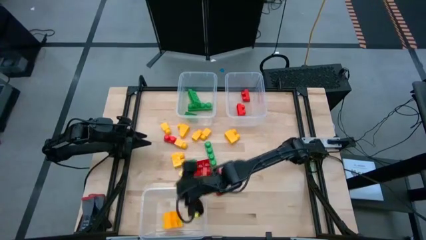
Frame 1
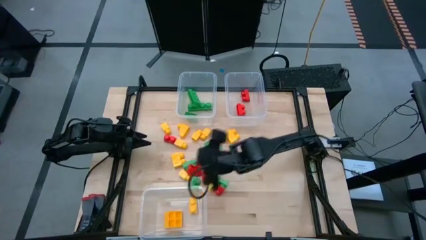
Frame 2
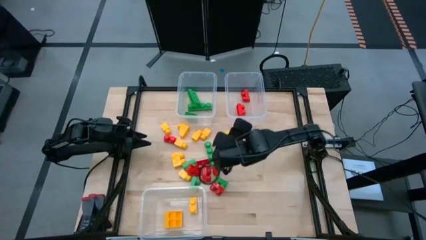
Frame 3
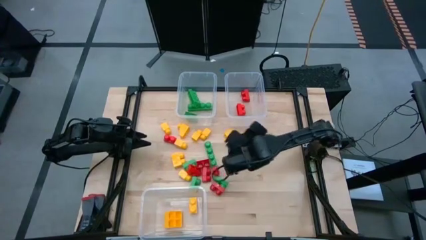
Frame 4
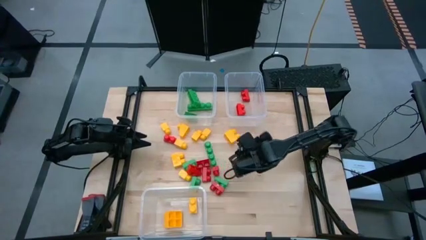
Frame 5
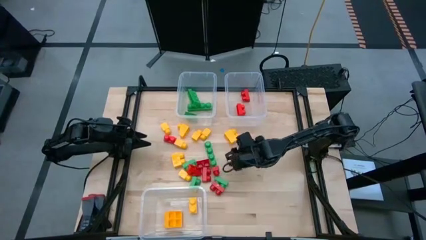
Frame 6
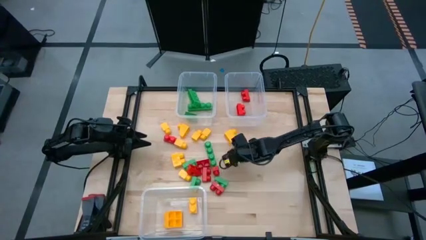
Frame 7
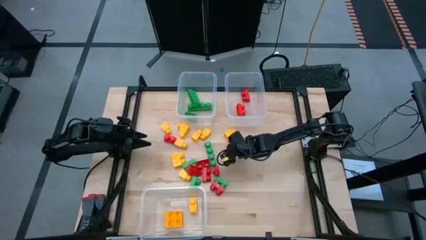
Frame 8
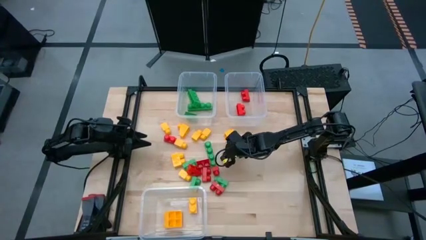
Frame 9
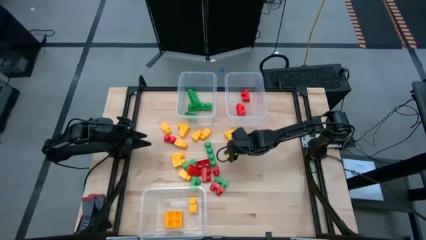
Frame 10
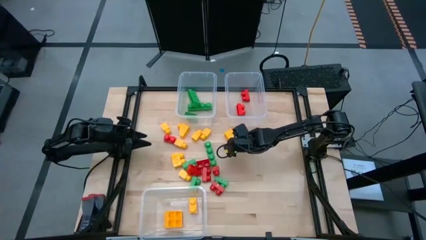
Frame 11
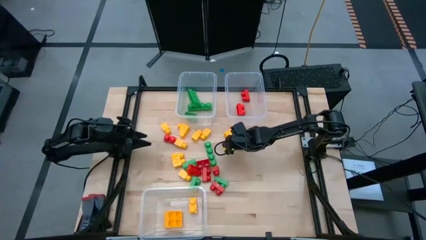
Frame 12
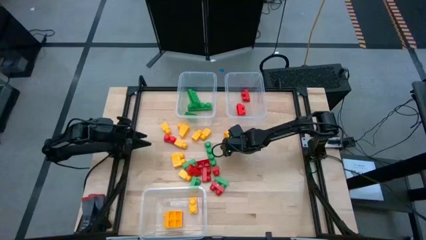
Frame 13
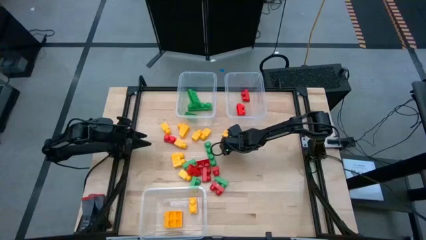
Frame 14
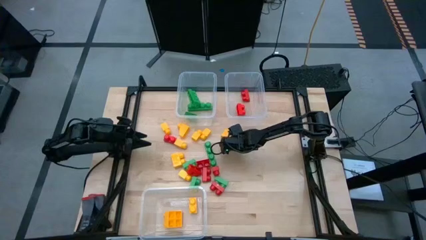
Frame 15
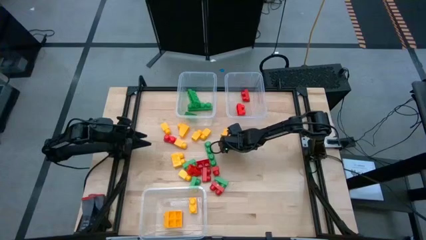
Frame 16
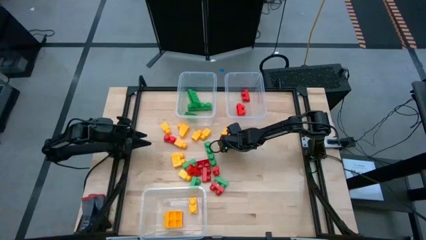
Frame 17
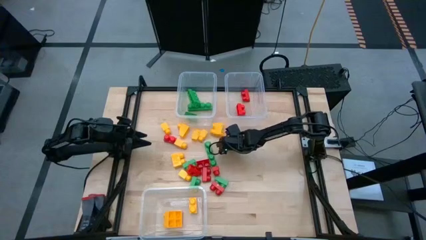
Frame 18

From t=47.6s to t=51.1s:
Task: Sort blocks
Put the yellow game piece into the bottom transparent bin

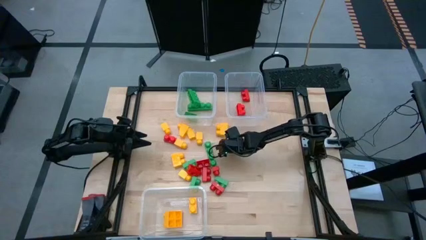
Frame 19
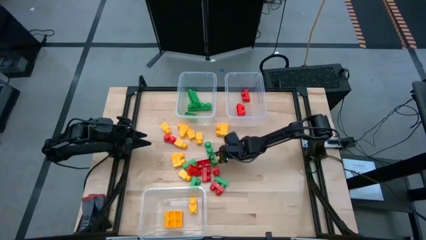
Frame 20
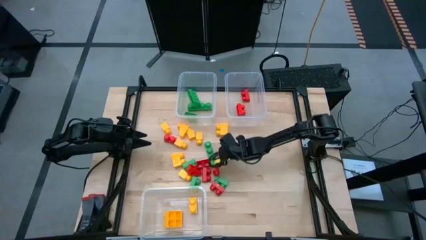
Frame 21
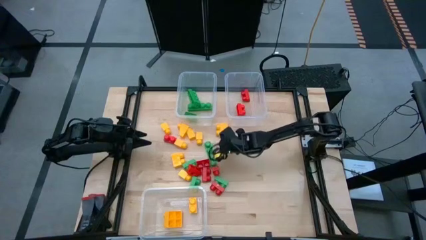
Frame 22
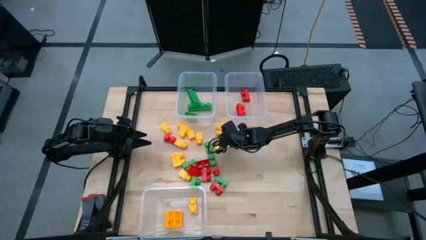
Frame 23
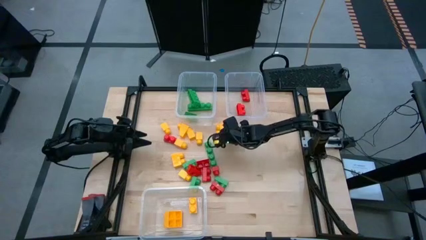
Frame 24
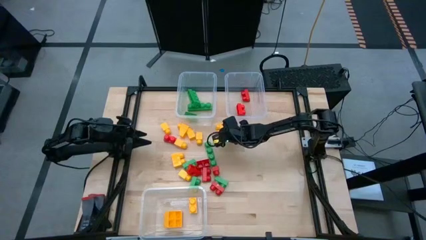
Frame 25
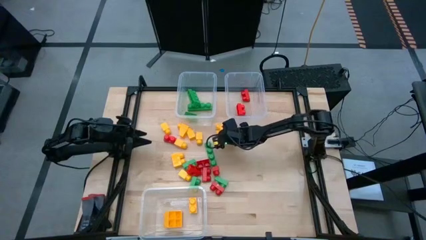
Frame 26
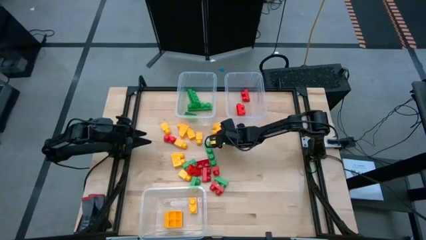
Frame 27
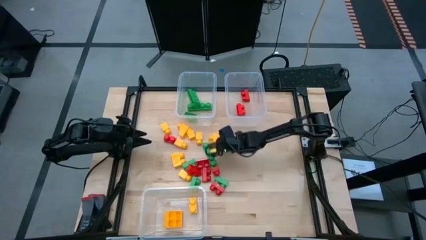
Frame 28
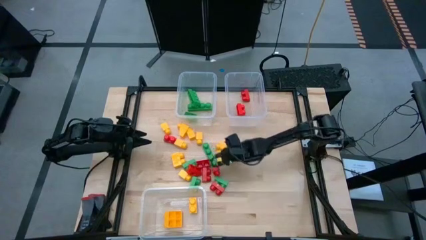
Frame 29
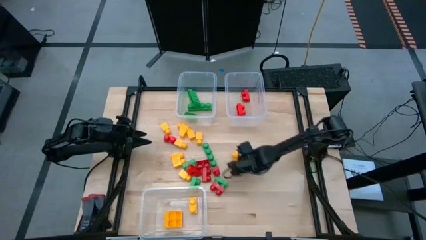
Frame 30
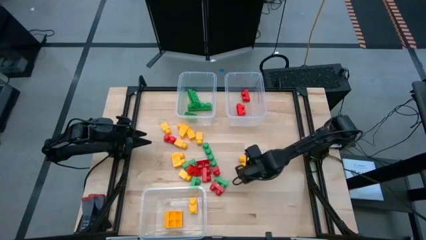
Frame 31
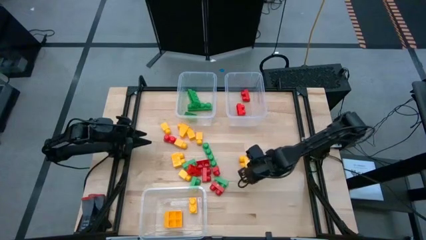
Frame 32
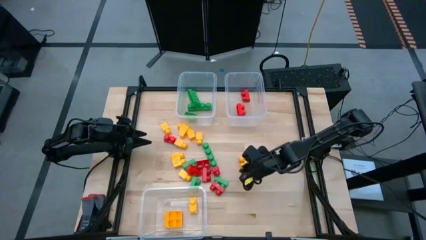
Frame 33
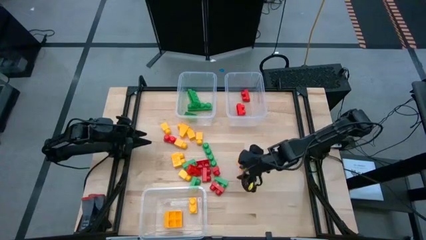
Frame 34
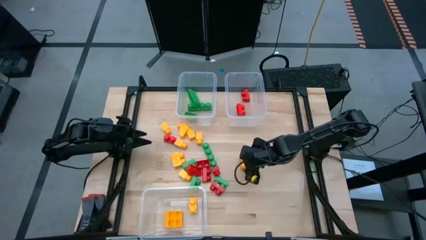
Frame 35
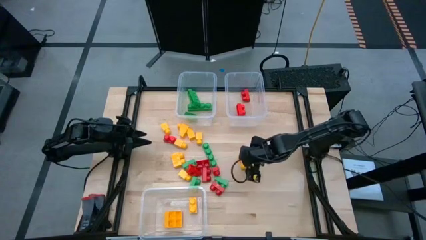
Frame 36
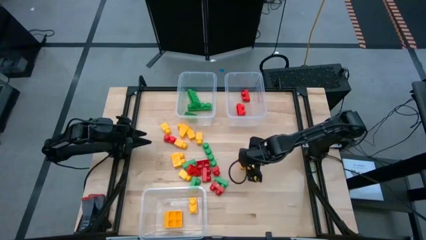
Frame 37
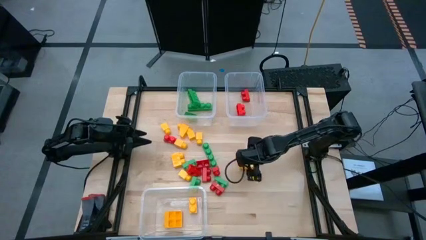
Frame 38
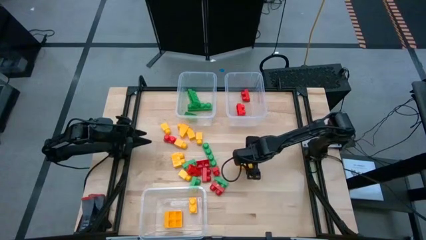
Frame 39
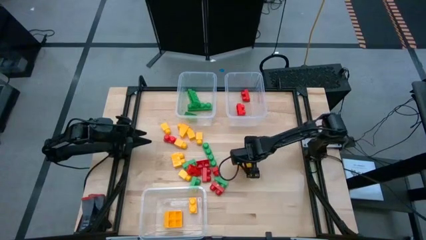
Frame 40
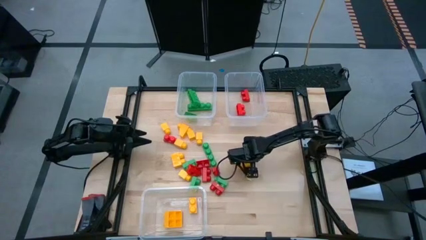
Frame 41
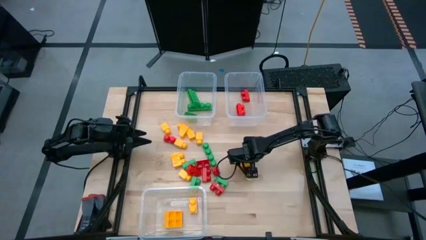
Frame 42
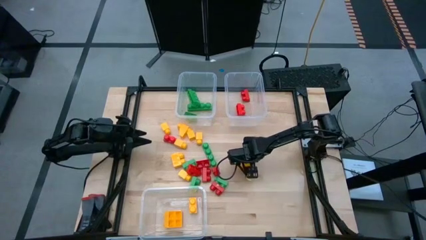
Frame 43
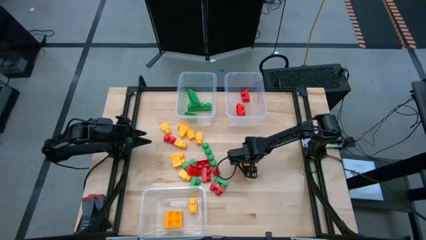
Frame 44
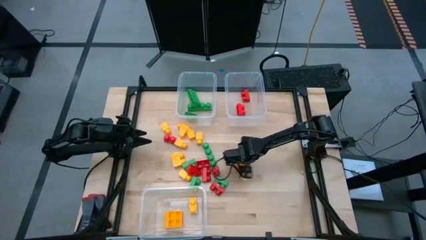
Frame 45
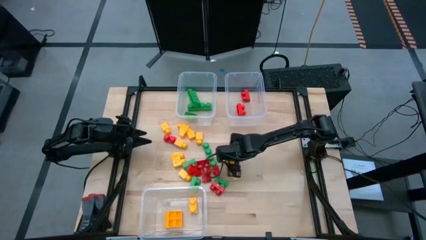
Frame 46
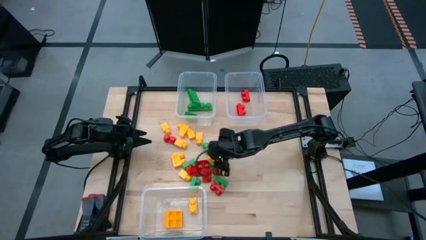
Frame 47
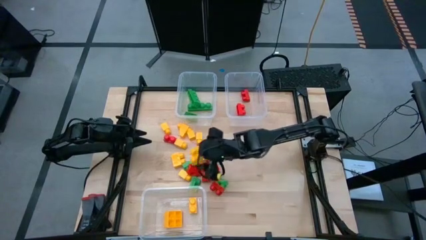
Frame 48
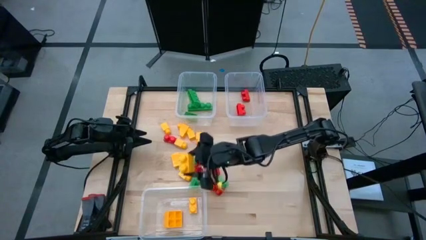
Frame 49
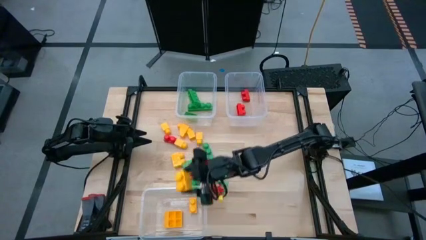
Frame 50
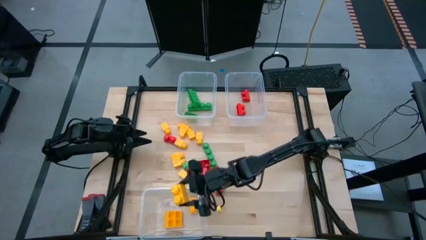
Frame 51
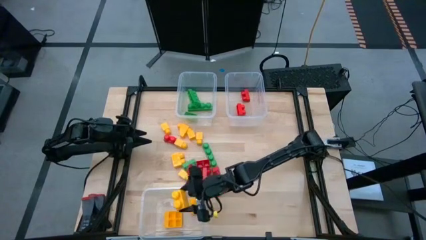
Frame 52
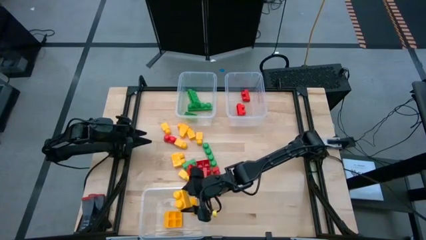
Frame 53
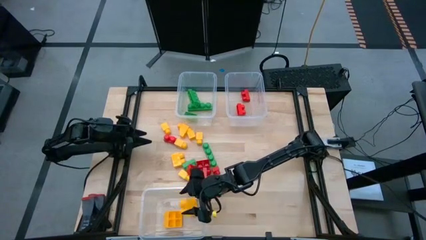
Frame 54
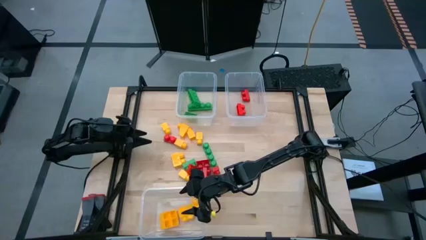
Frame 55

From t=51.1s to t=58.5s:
Put the yellow game piece into the bottom transparent bin

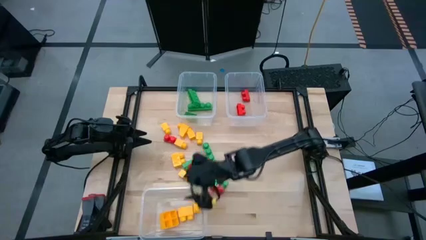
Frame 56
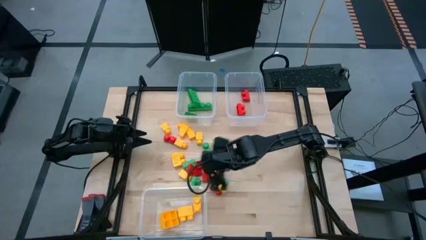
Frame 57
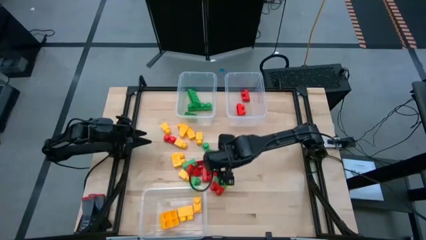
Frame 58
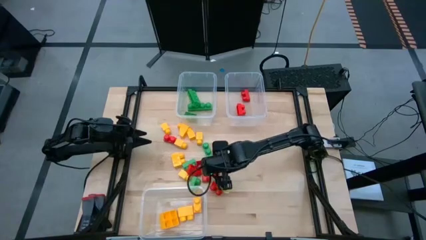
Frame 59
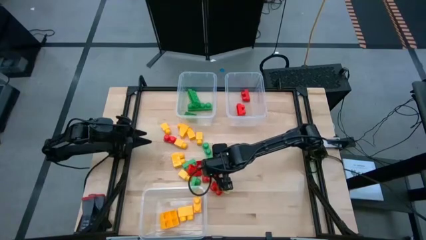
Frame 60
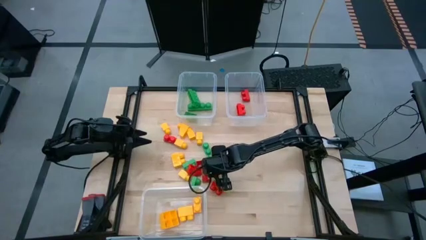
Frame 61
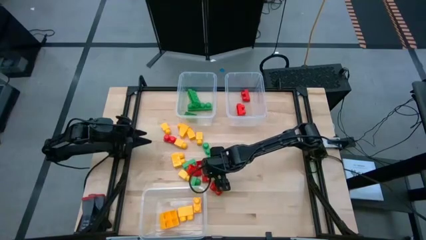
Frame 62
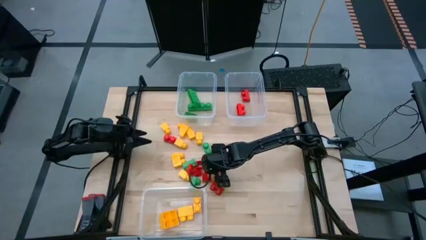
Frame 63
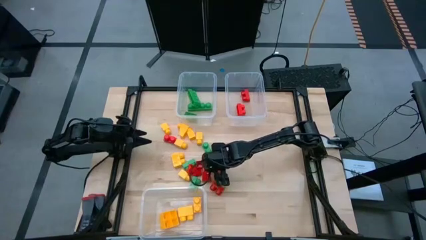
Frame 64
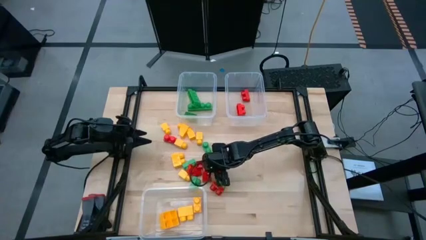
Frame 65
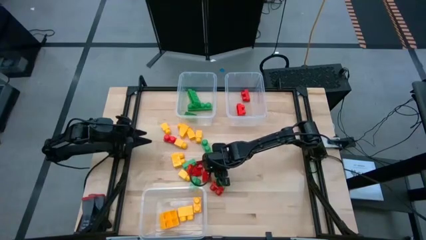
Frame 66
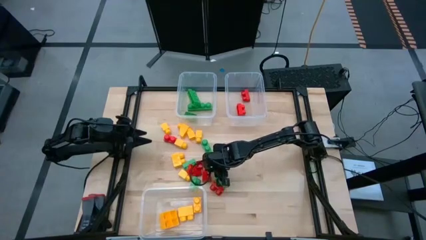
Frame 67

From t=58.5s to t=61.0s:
Put the red game piece into the top right transparent bin

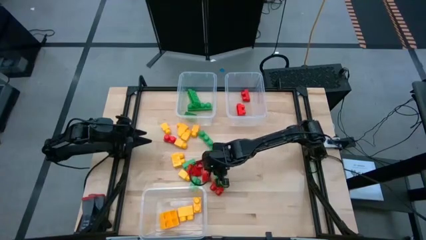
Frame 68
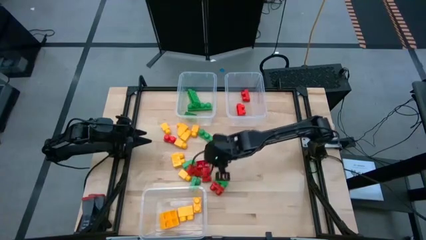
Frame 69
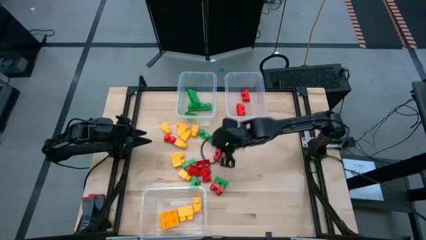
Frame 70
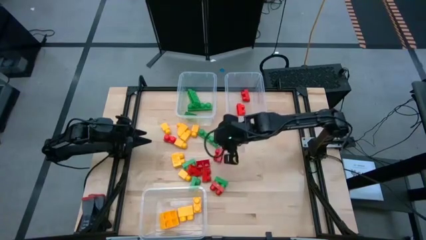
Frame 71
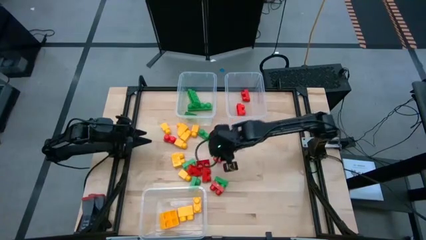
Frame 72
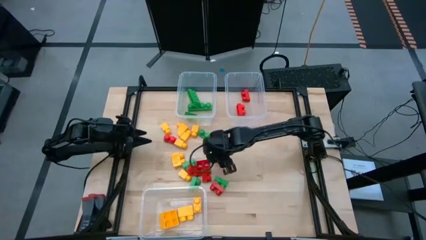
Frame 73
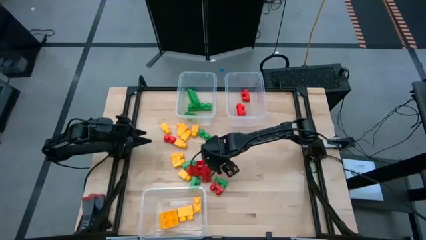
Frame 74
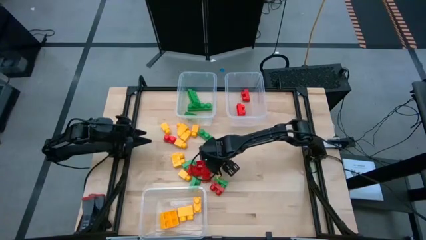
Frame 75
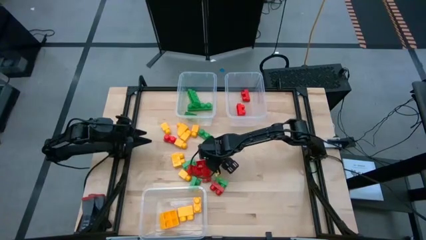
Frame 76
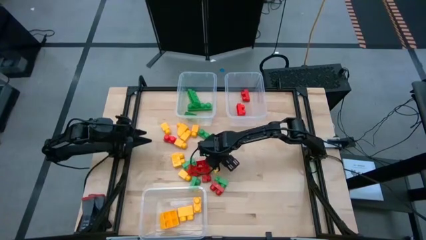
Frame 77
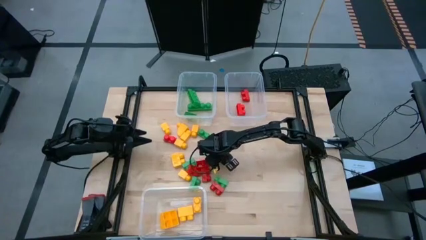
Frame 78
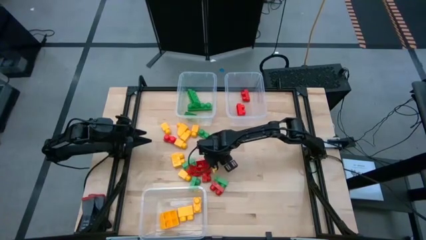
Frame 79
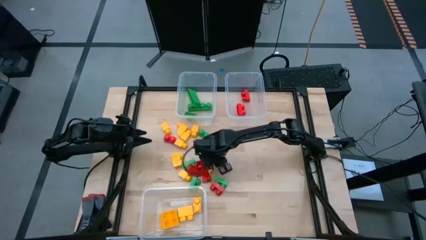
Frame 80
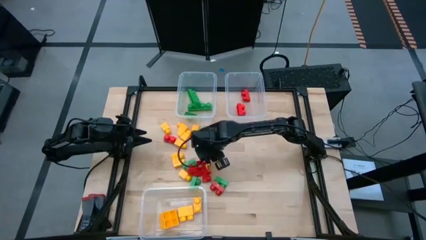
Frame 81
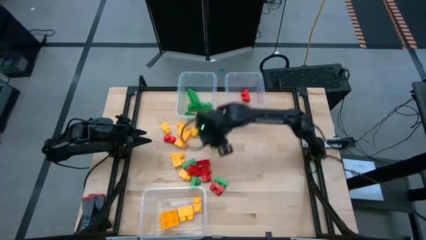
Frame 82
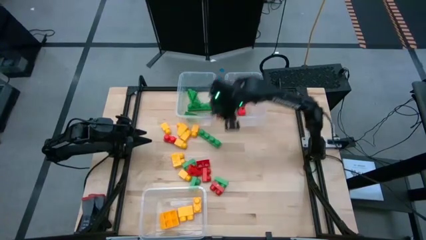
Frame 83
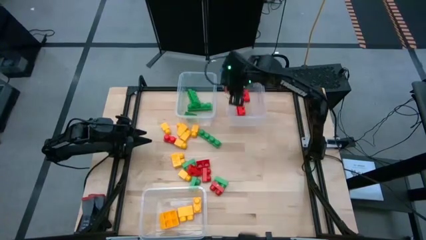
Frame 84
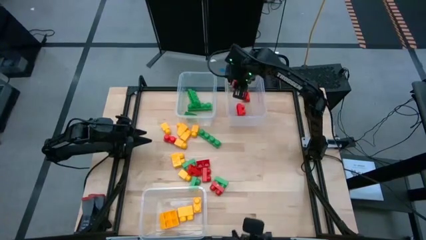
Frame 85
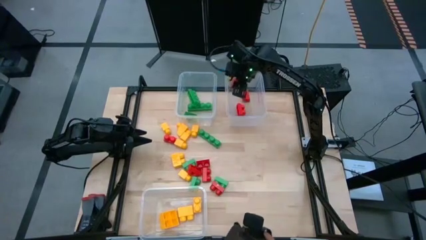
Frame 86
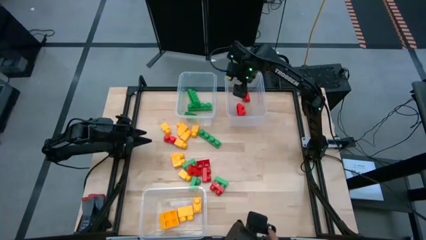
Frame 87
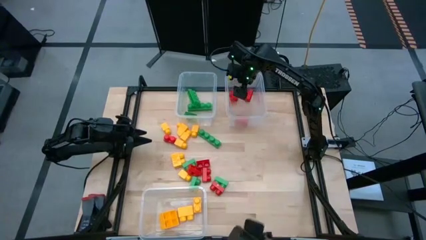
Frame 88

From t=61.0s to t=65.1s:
Put the red game piece into the top right transparent bin
